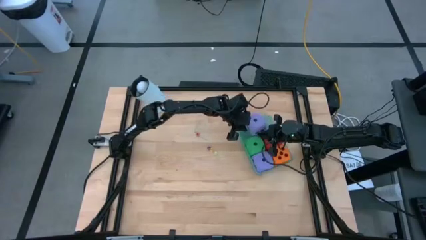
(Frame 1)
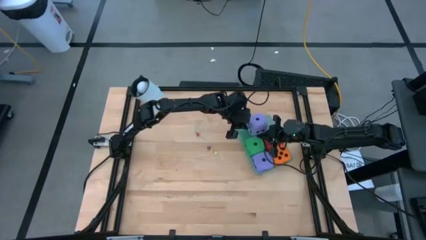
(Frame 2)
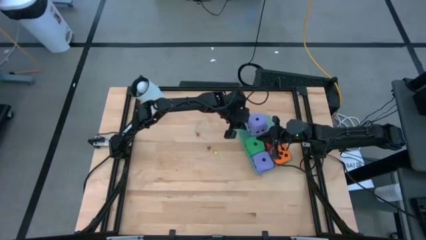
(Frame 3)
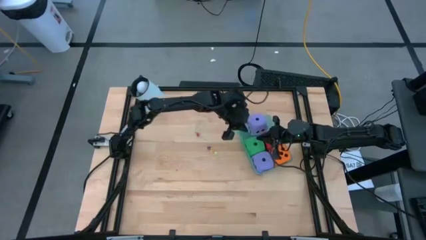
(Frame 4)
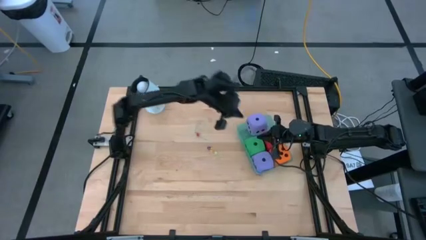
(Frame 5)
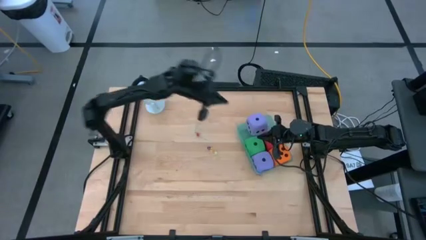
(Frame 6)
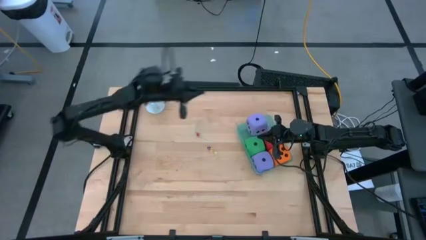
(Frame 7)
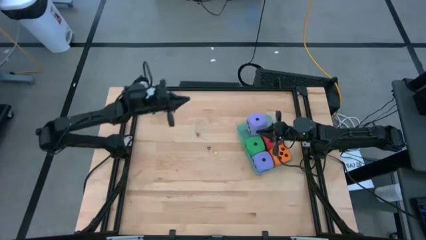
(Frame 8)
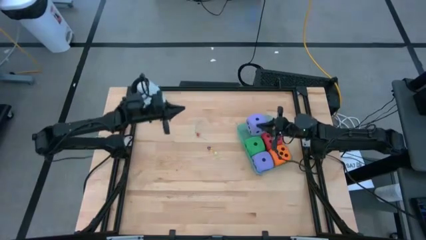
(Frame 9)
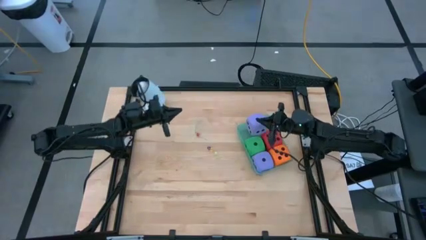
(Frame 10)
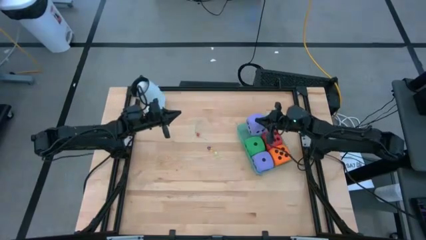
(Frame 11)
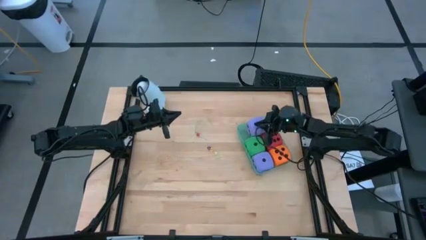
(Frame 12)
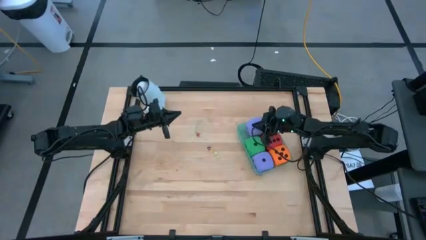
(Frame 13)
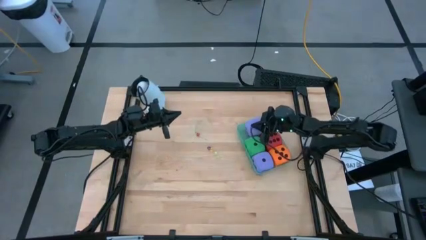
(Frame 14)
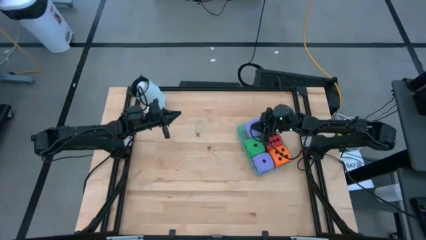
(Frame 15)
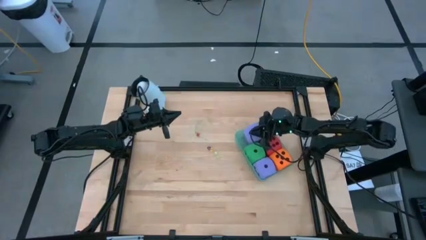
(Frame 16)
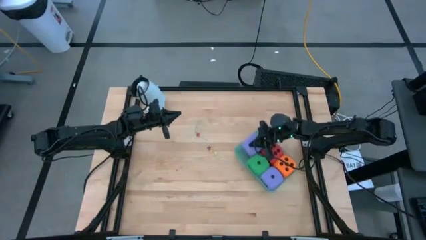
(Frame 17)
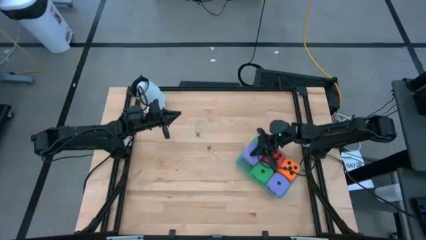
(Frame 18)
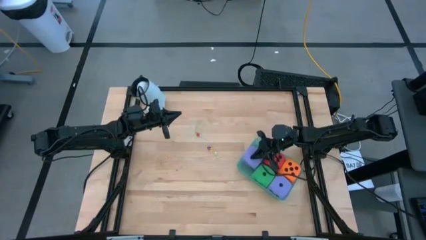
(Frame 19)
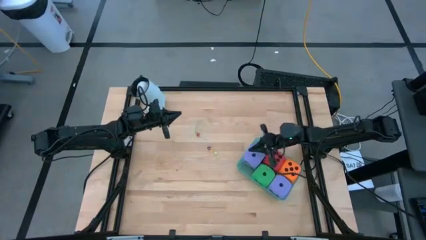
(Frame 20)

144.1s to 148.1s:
Task: Pick & Place Dice
Put the big purple dice into the bin

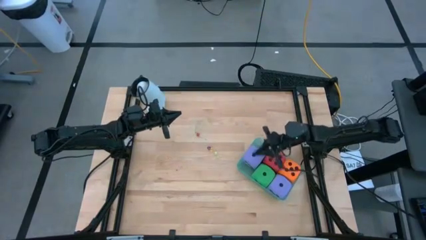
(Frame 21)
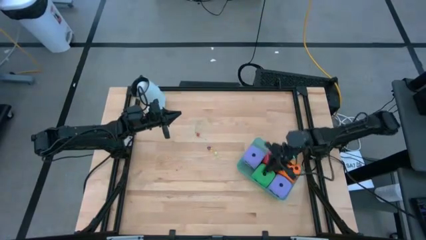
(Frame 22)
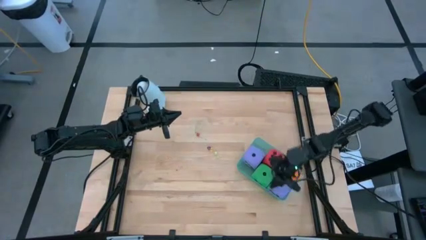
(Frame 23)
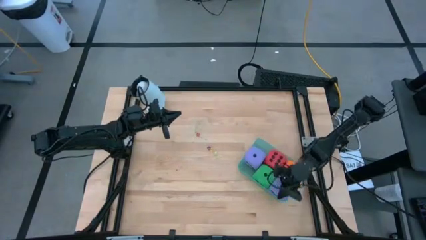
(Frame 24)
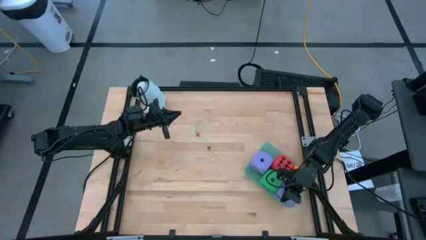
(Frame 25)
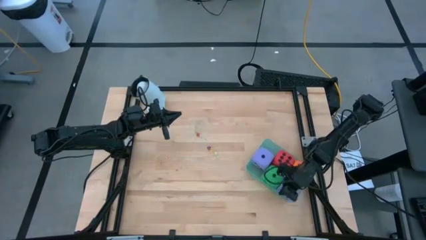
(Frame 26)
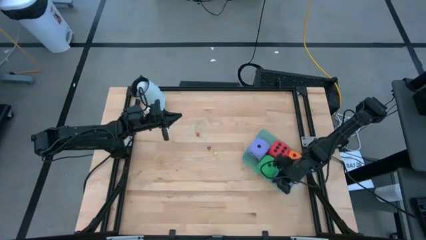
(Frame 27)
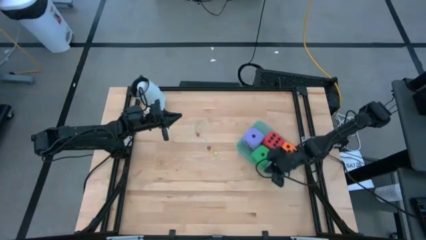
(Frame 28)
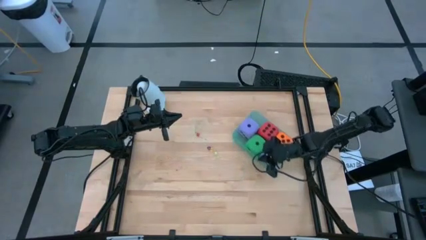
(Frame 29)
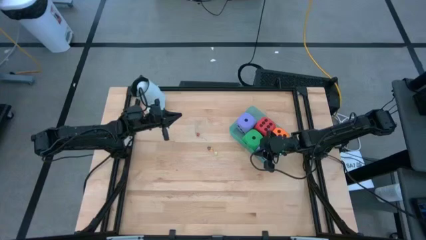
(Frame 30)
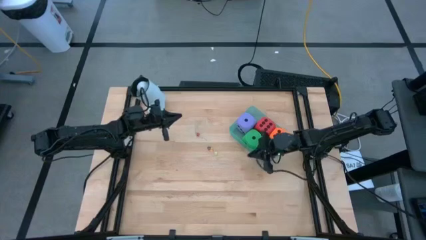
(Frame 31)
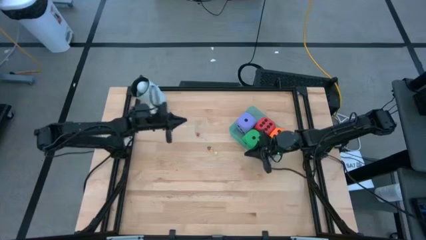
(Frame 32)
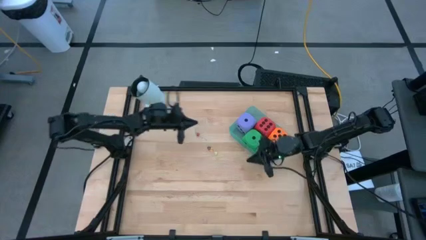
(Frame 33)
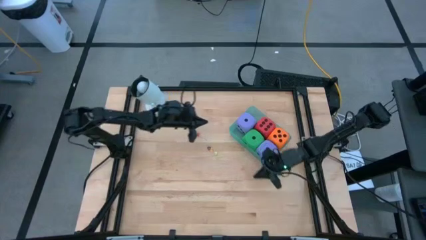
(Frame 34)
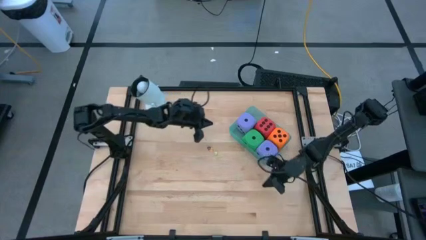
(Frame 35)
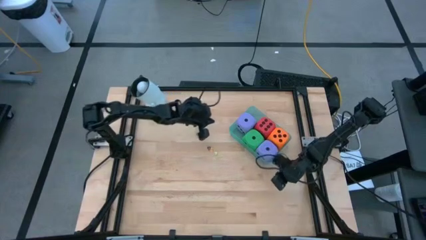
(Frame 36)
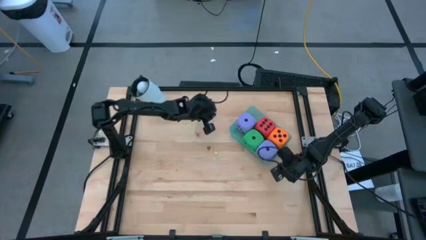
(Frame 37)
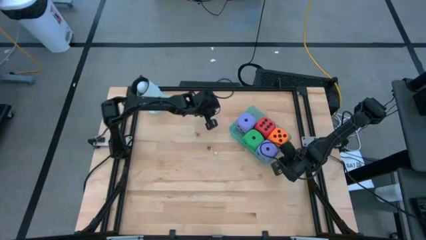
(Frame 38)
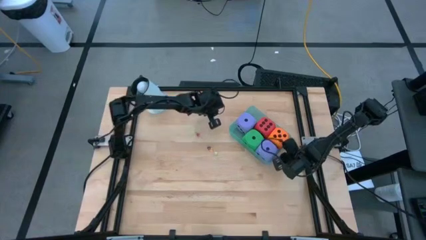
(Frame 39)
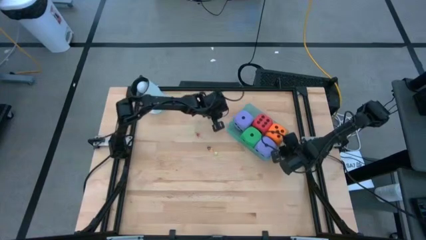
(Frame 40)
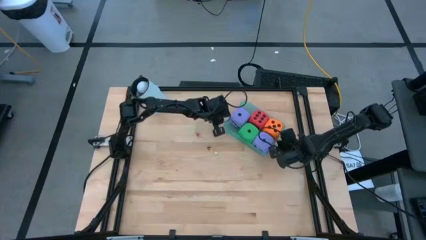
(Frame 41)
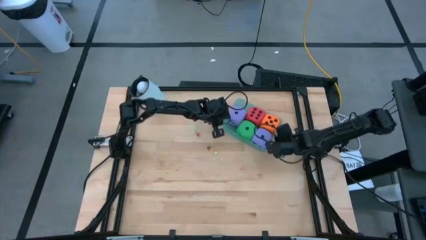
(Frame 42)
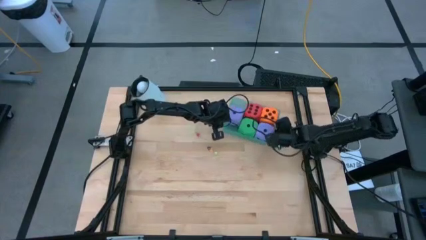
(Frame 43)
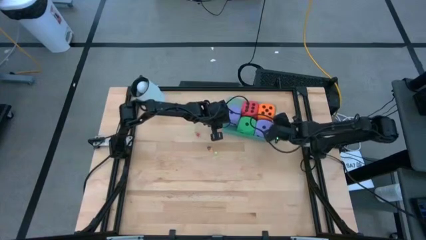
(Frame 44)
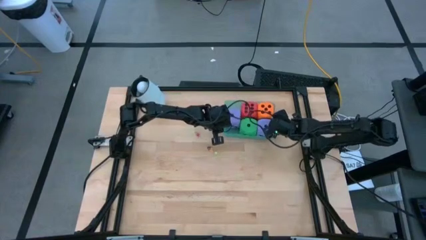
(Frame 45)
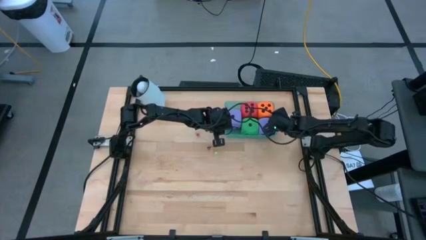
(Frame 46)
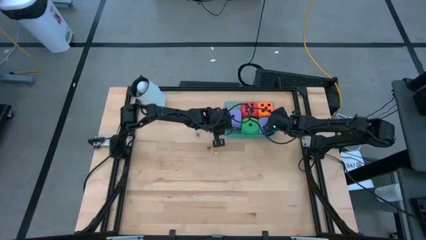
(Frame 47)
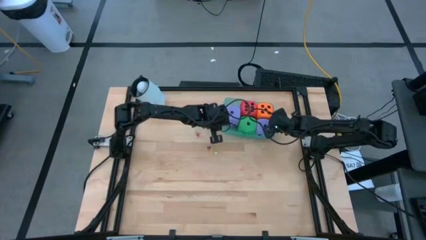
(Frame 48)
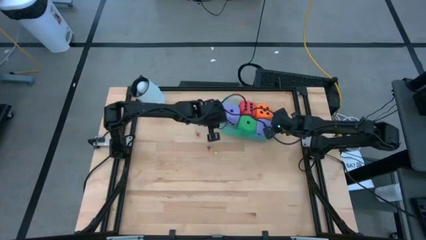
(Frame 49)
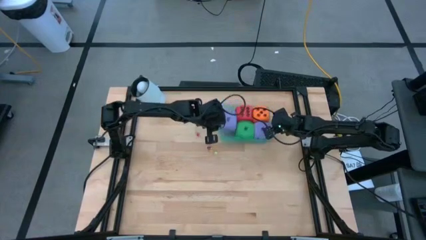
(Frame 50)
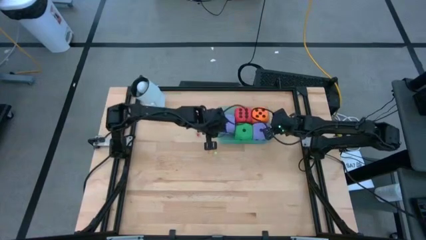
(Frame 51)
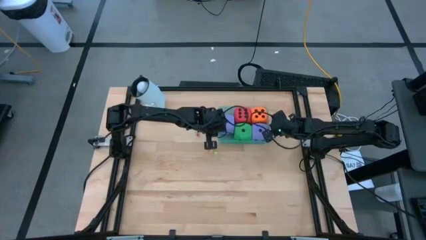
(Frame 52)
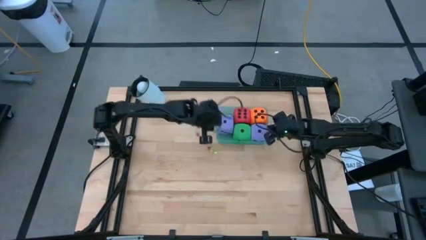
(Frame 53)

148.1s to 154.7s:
Move the bin

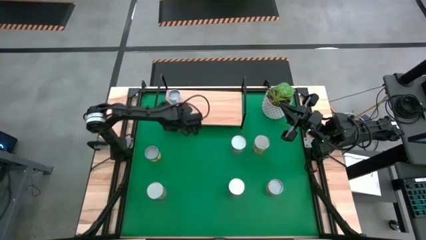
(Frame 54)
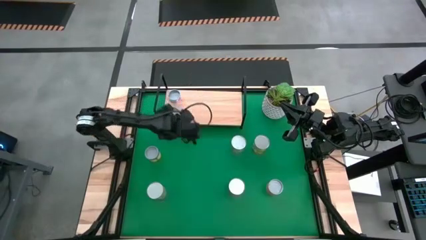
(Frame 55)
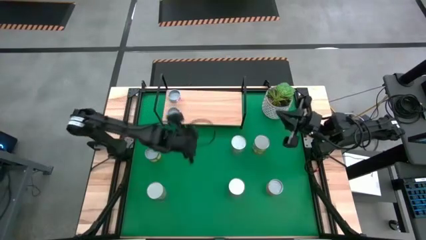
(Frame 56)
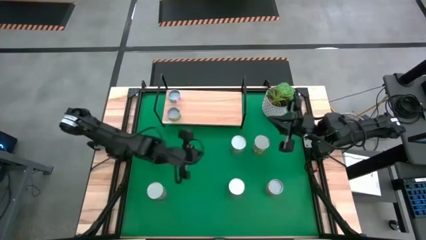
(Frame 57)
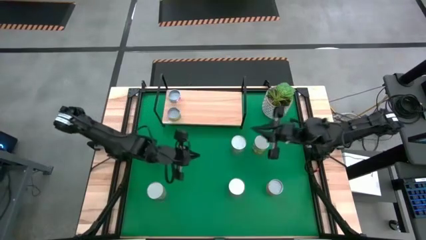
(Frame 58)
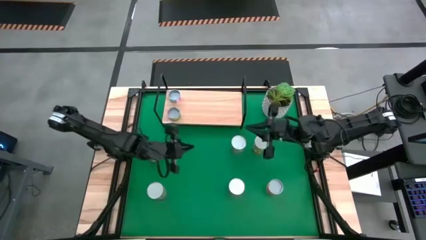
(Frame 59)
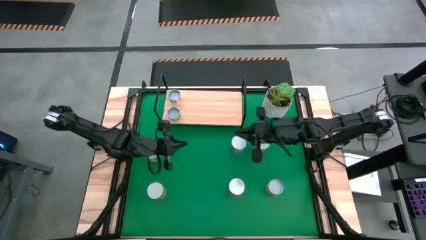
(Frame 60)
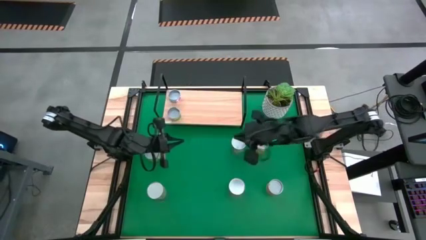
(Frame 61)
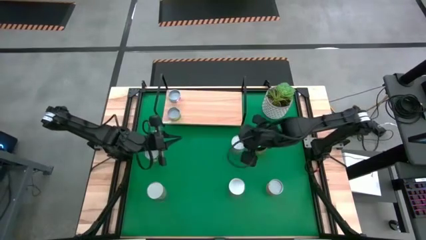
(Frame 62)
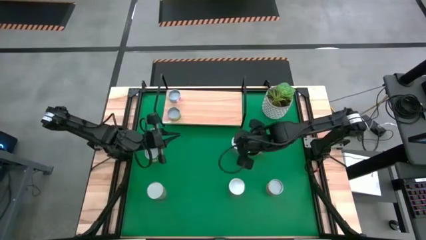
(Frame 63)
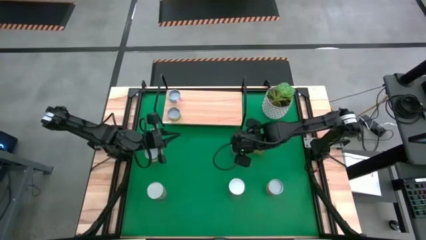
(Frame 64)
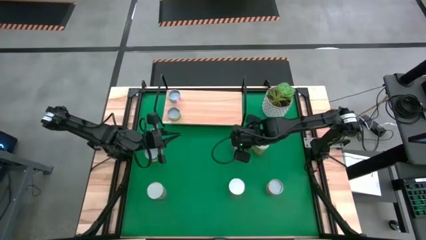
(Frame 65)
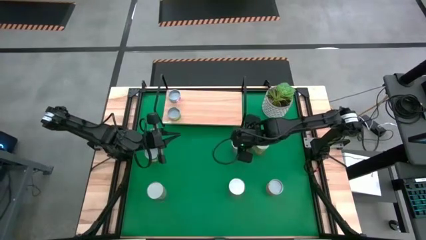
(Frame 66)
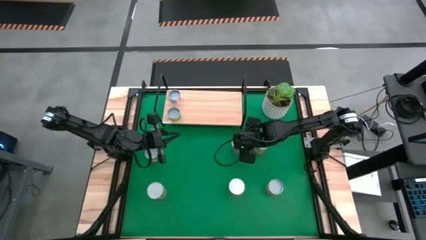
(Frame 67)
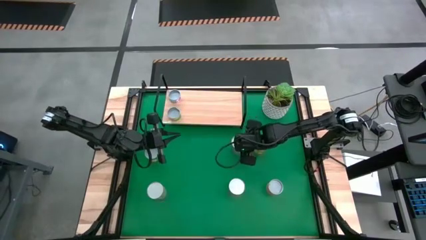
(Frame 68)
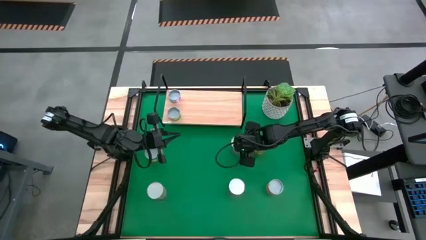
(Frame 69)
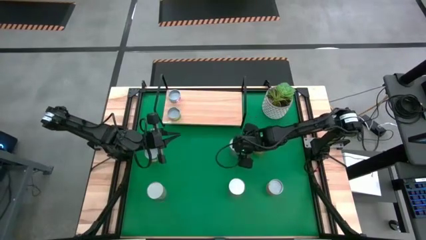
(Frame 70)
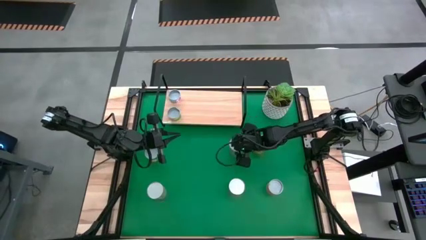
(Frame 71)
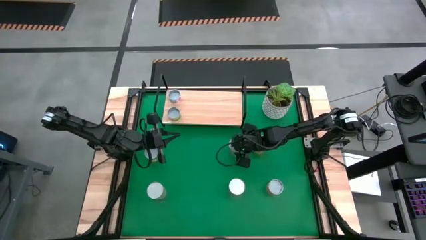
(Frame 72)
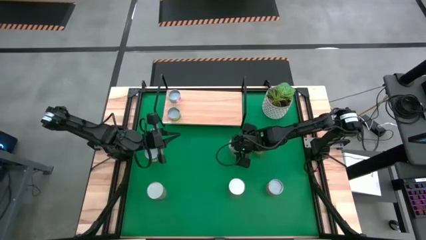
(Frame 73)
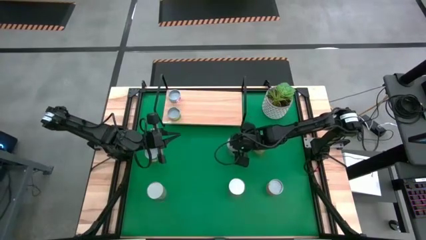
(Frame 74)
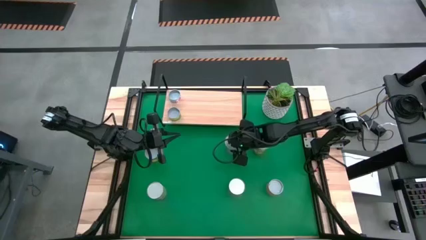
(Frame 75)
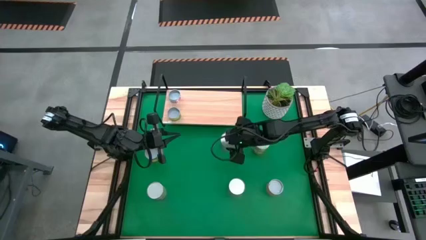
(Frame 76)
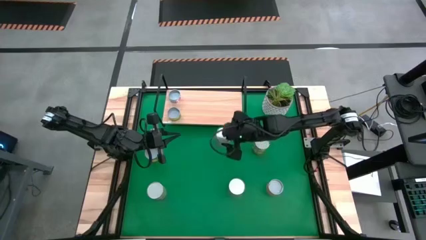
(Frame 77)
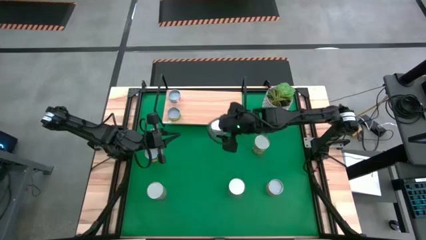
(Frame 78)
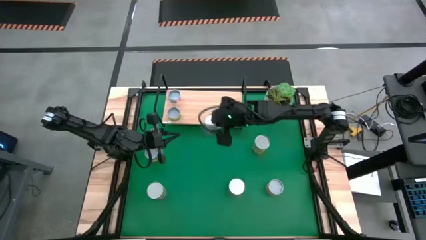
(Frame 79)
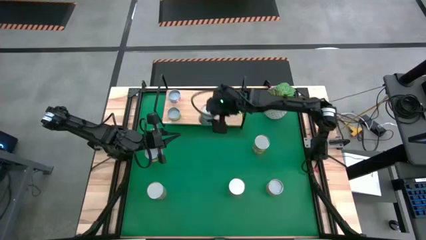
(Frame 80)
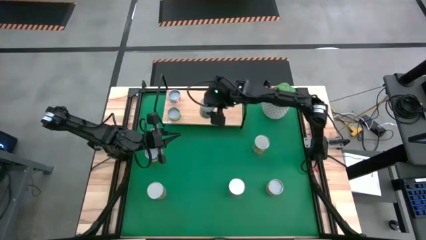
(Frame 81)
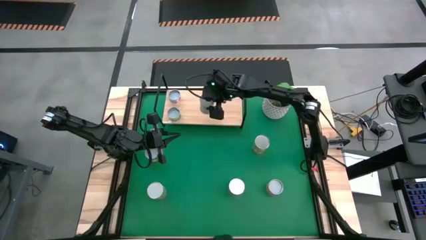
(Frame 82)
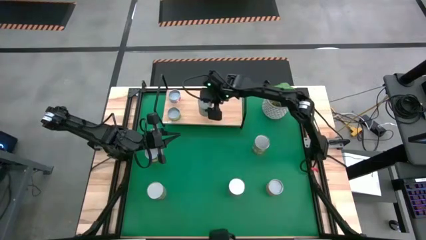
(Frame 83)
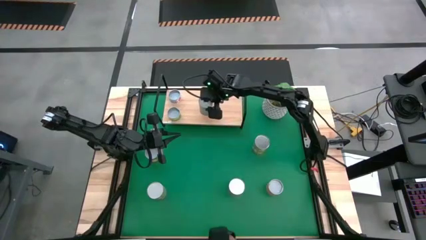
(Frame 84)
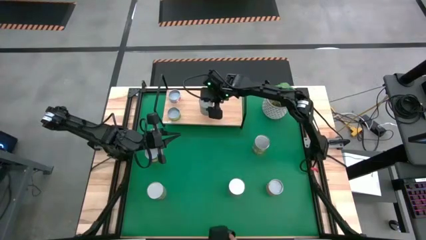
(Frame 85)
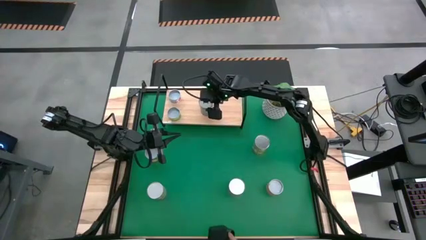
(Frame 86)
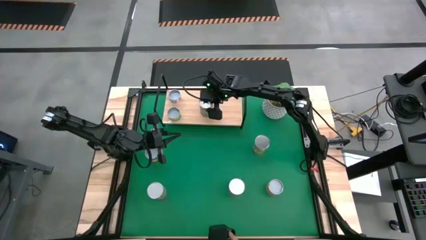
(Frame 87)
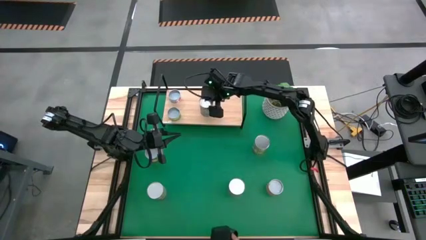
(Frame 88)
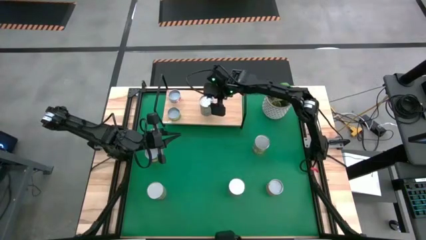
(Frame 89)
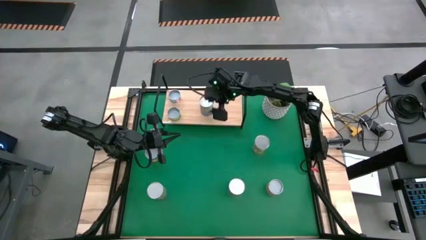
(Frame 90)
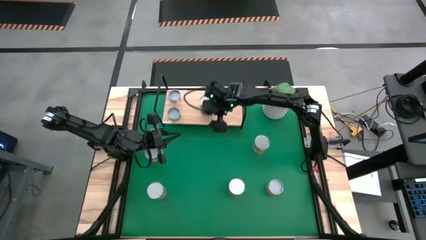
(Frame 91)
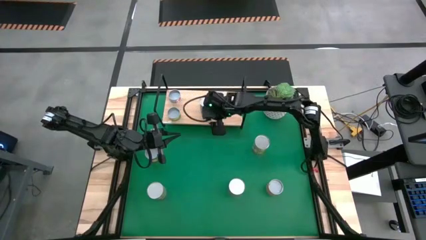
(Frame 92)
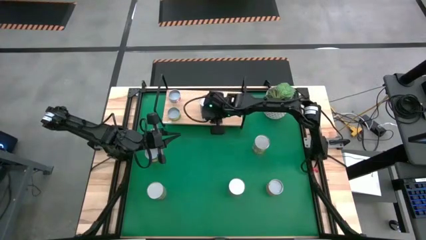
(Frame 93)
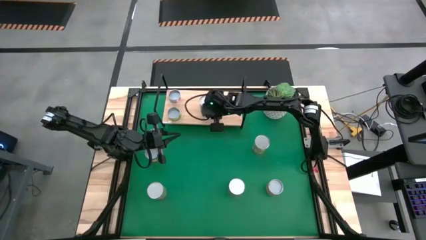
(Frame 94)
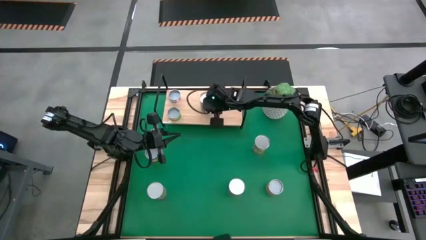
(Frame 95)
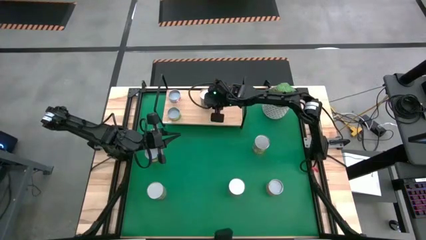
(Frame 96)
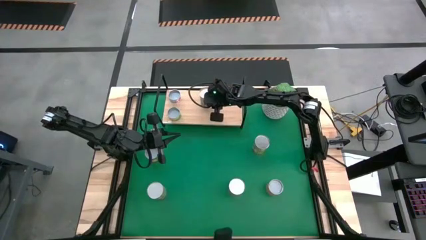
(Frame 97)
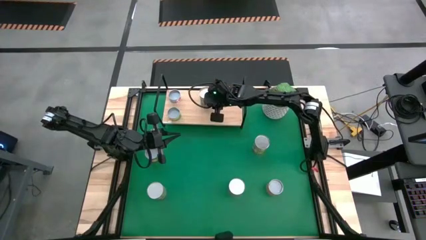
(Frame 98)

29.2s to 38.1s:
Task: Pick and place cans onto a shelf
Put the canned cherries on the shelf
